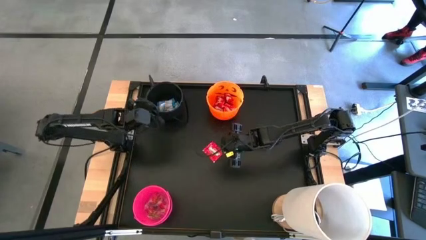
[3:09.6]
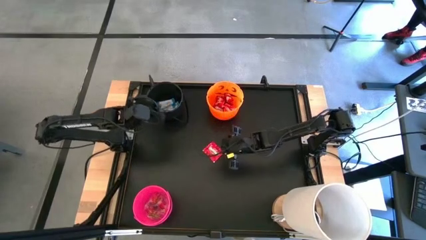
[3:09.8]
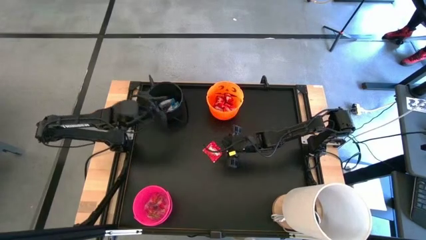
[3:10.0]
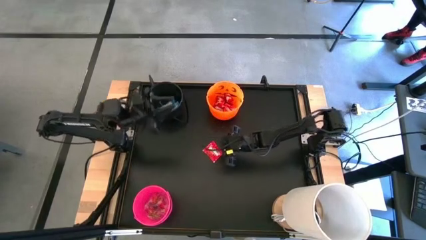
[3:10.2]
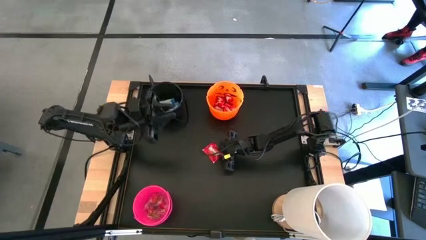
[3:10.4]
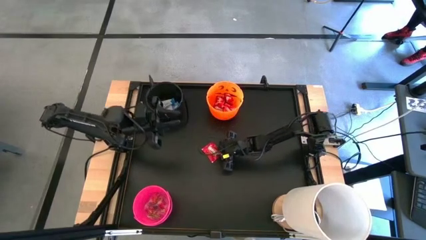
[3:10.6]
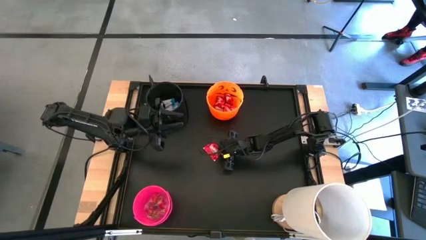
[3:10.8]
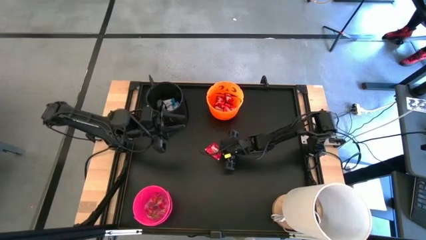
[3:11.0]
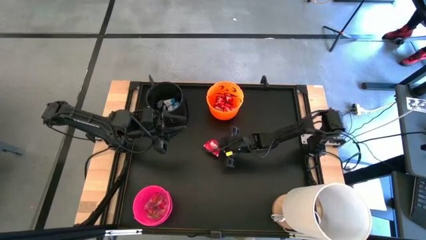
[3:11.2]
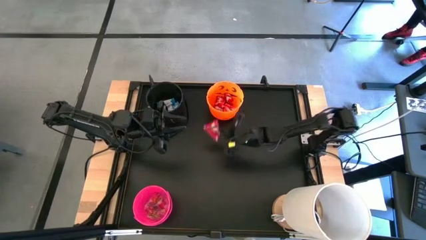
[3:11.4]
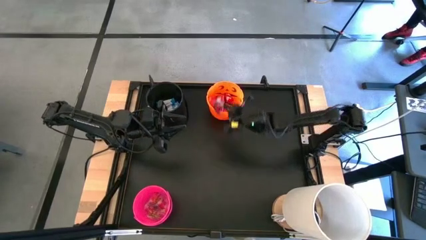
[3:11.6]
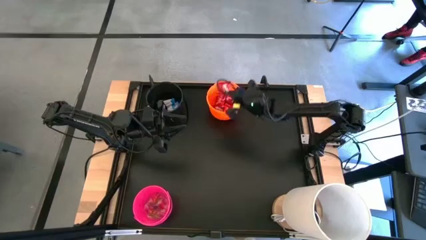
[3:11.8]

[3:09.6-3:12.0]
Task: Sort candy
Put the red candy into the pink bin

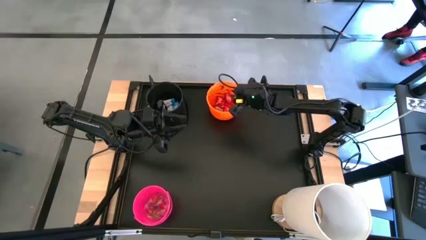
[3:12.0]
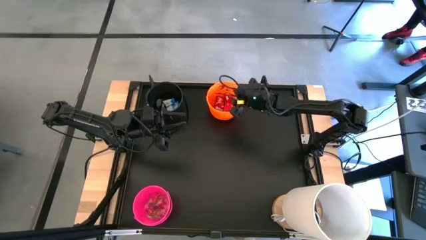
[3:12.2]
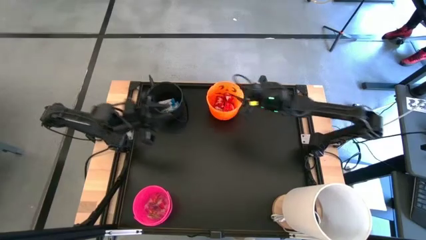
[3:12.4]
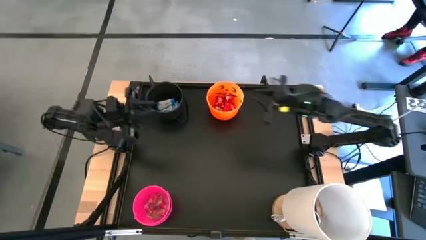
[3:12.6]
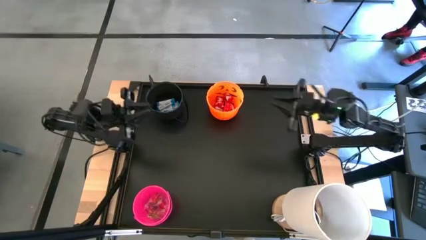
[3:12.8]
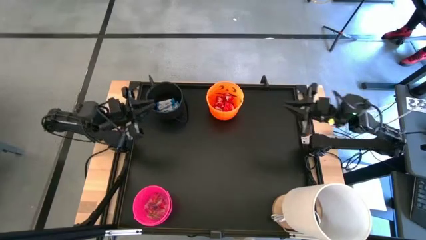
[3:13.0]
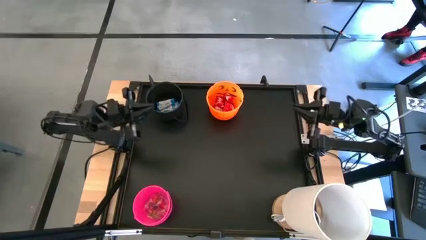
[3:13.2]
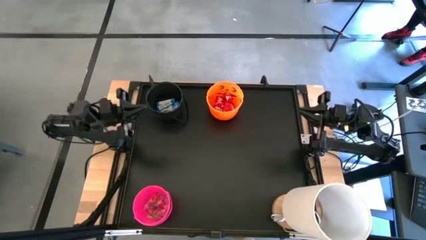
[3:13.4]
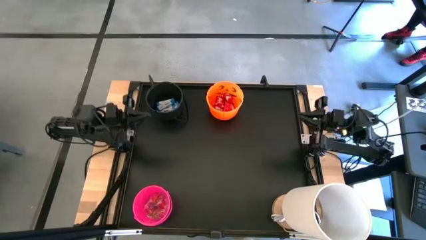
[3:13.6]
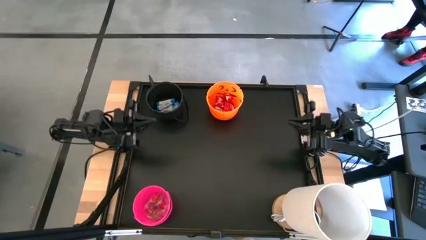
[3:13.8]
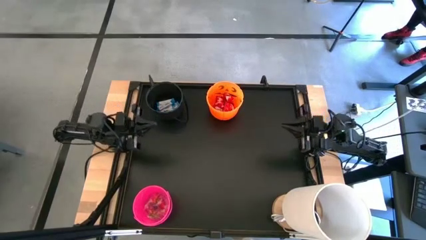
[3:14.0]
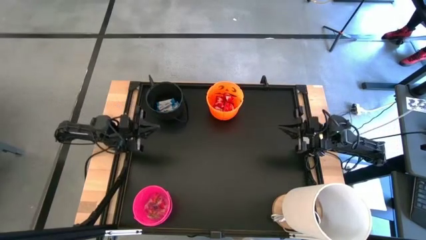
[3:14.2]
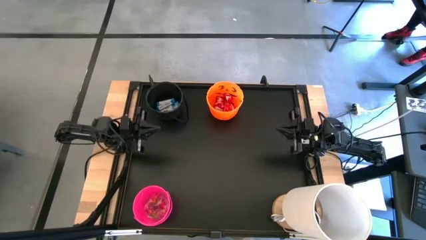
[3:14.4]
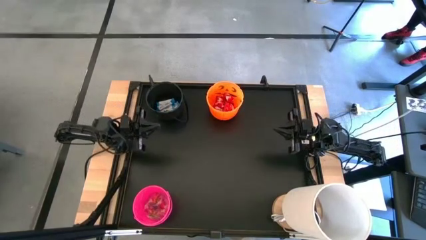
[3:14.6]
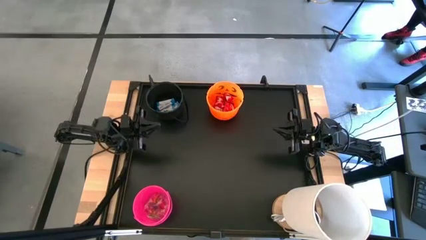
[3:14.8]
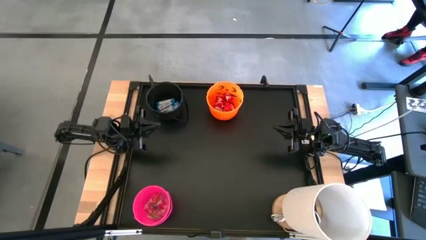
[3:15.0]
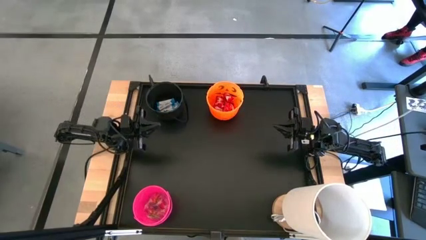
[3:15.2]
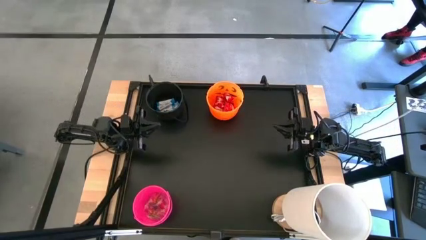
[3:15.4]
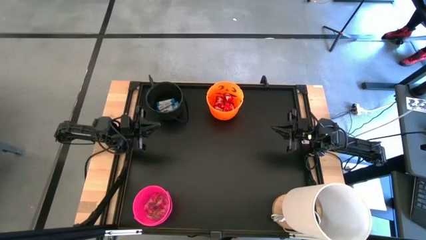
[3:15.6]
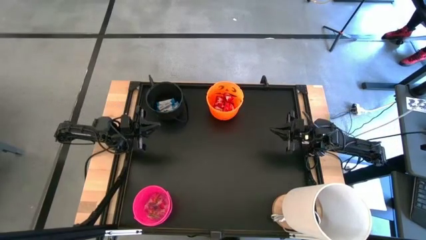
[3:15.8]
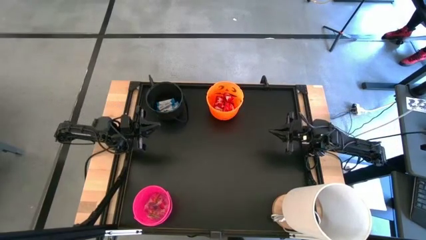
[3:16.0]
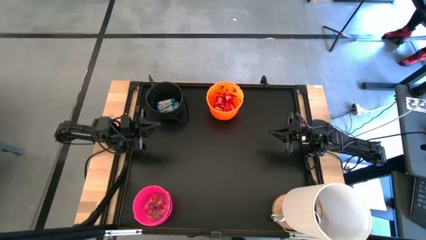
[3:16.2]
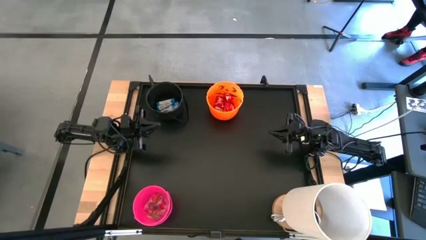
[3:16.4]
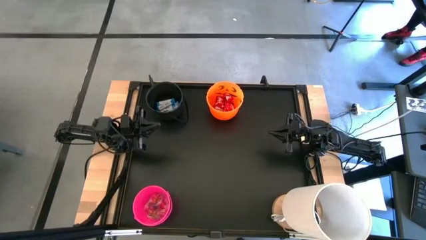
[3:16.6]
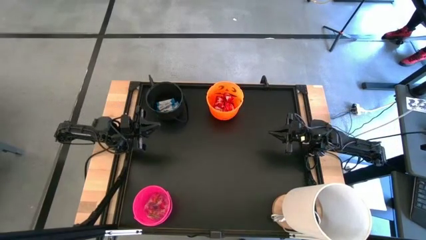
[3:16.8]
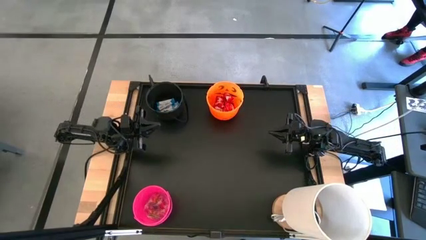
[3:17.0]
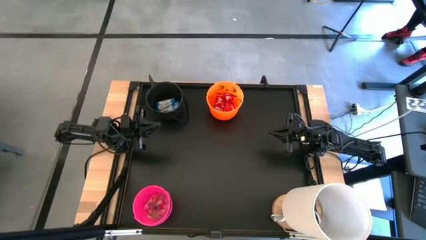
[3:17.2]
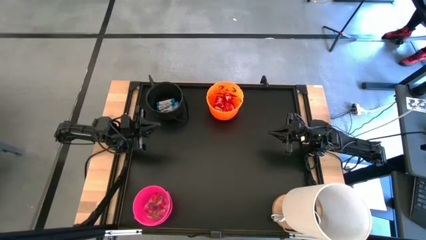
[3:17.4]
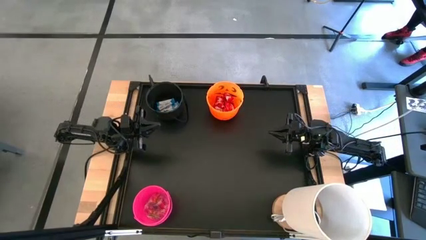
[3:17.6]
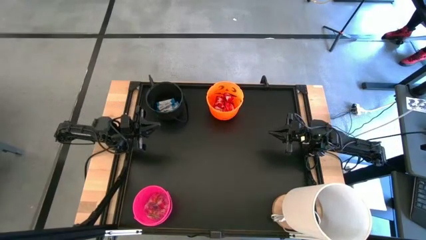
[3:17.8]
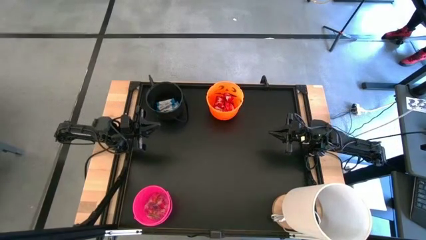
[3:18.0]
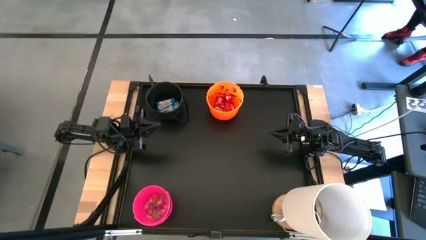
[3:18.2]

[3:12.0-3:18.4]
Return to Home Position

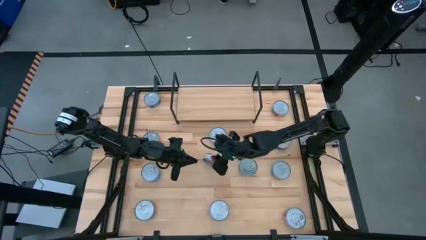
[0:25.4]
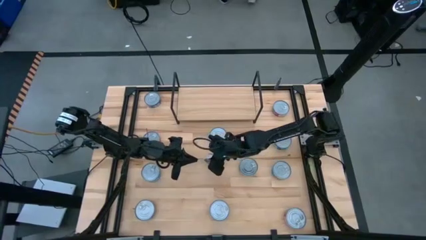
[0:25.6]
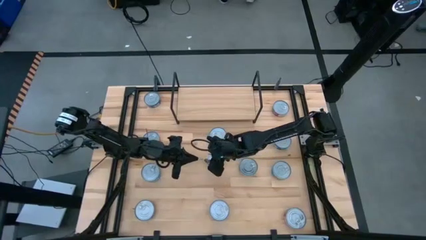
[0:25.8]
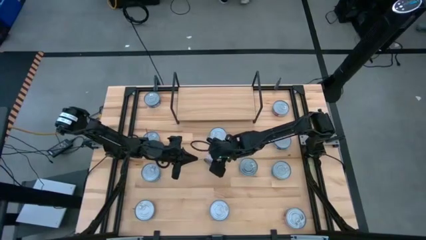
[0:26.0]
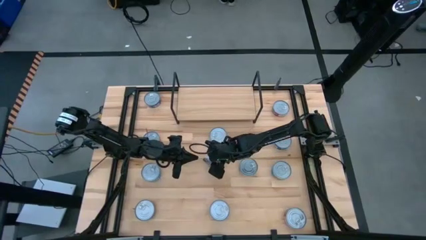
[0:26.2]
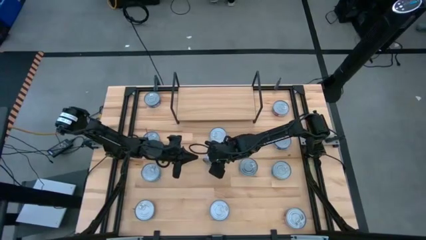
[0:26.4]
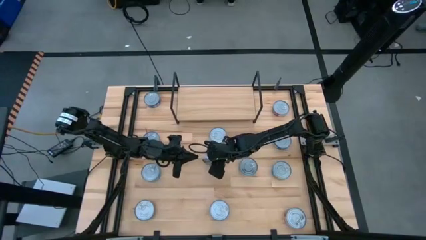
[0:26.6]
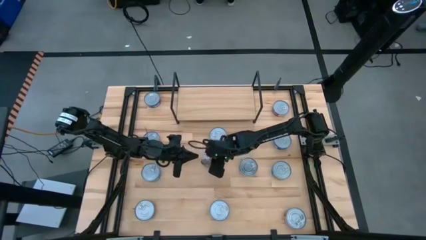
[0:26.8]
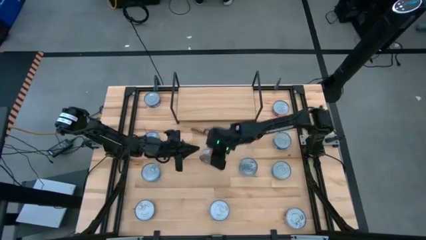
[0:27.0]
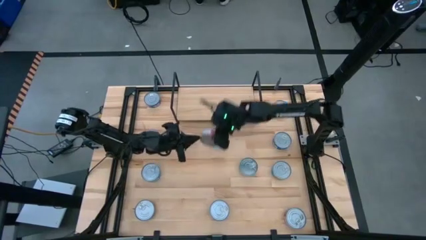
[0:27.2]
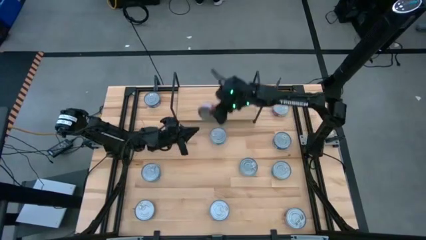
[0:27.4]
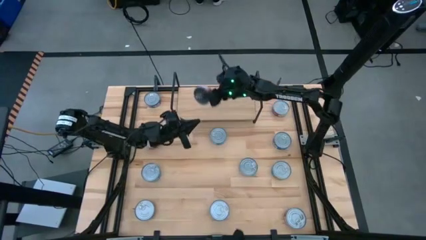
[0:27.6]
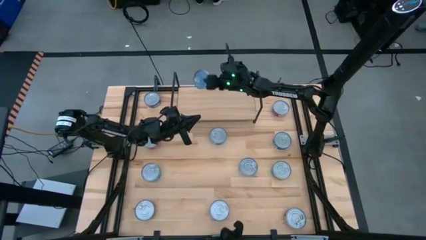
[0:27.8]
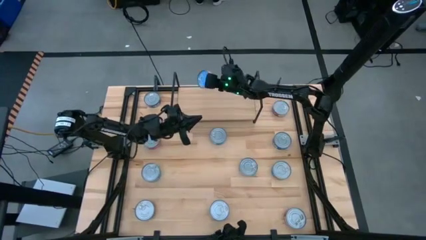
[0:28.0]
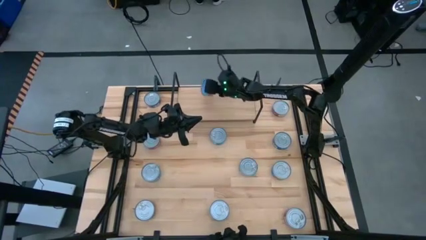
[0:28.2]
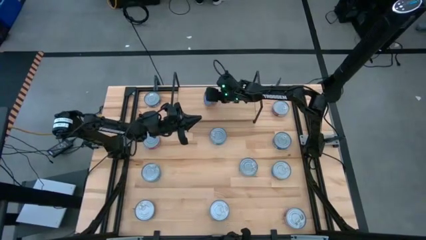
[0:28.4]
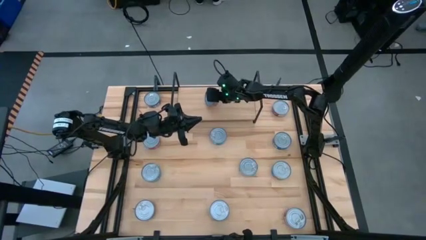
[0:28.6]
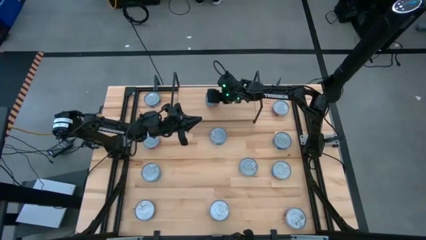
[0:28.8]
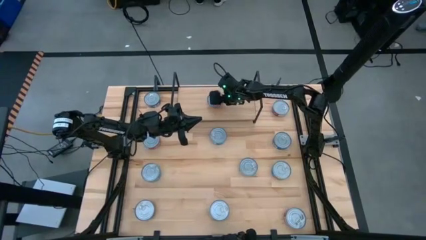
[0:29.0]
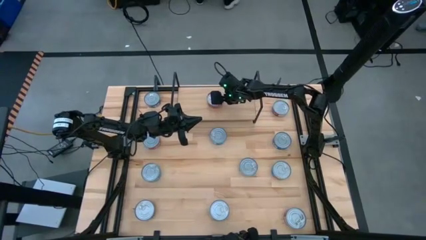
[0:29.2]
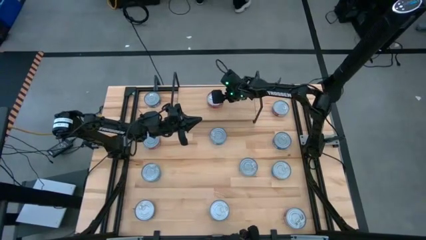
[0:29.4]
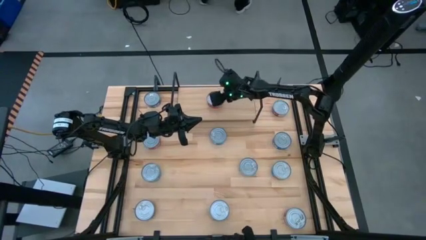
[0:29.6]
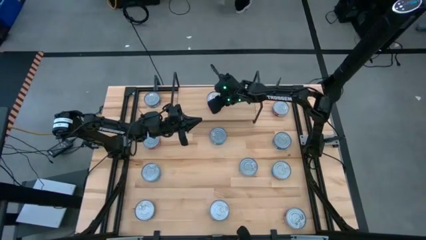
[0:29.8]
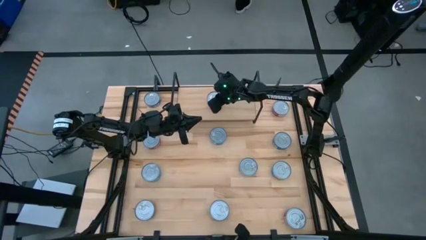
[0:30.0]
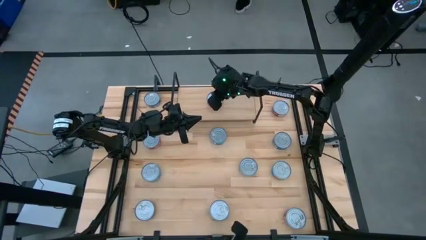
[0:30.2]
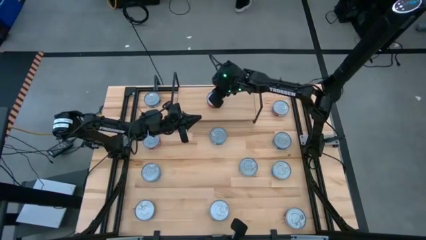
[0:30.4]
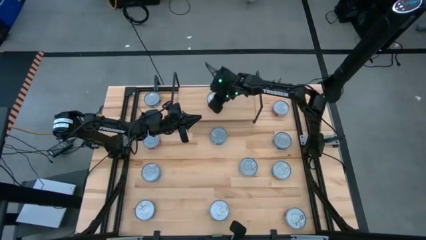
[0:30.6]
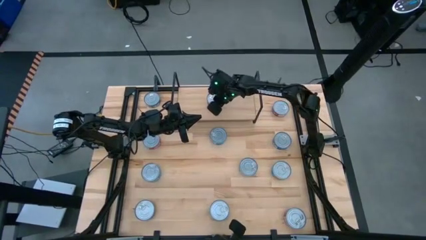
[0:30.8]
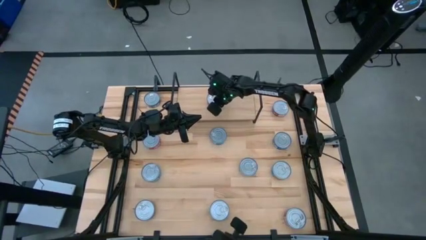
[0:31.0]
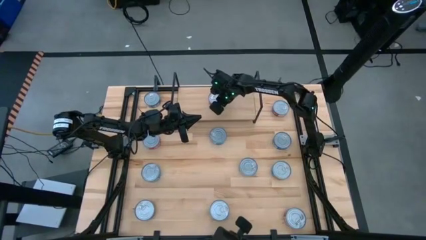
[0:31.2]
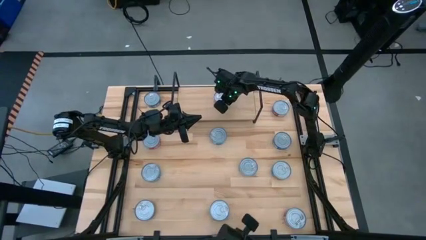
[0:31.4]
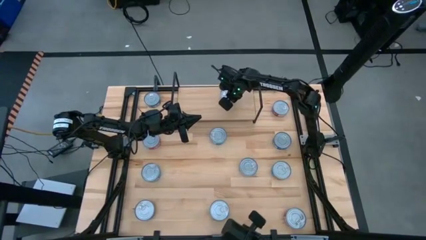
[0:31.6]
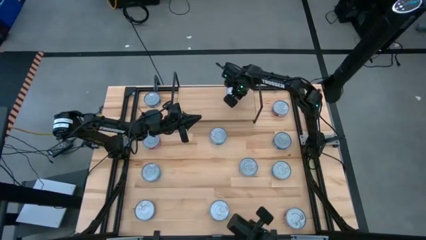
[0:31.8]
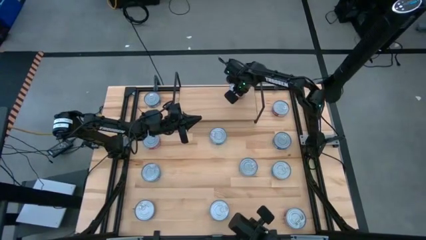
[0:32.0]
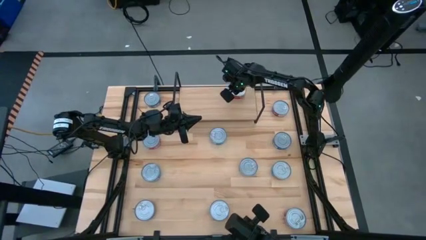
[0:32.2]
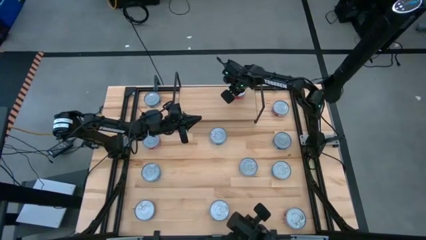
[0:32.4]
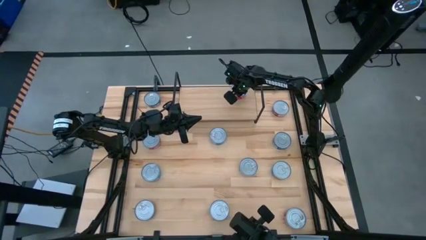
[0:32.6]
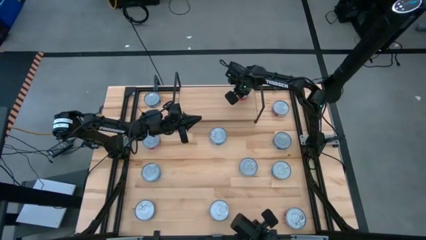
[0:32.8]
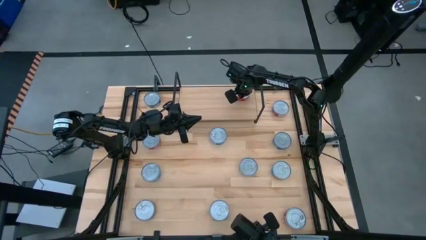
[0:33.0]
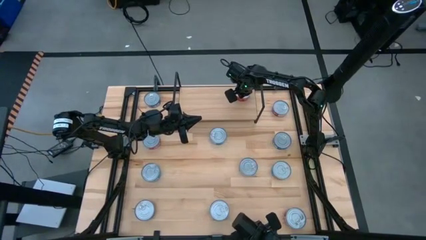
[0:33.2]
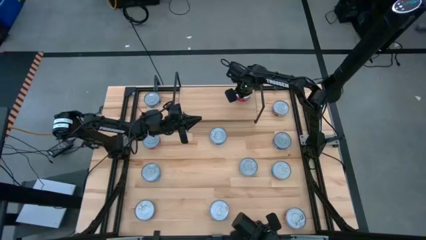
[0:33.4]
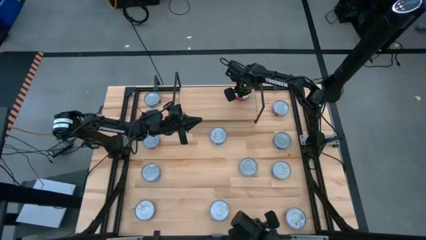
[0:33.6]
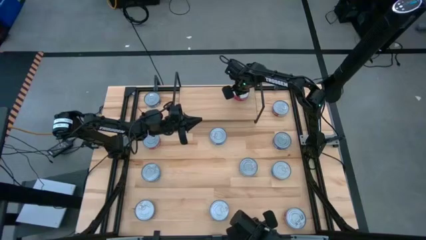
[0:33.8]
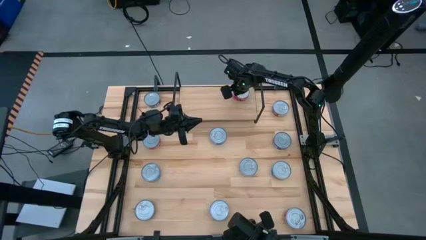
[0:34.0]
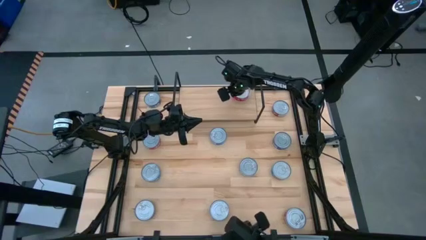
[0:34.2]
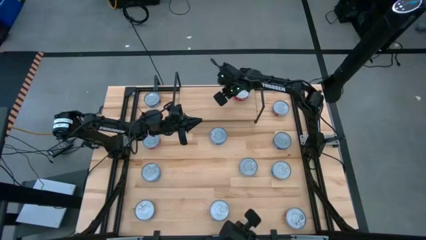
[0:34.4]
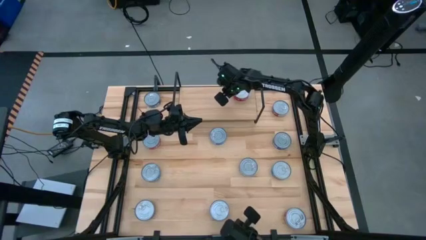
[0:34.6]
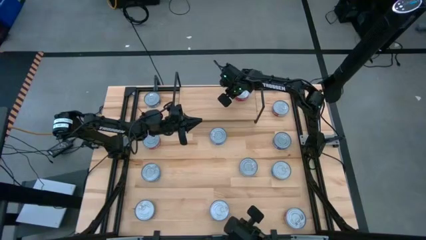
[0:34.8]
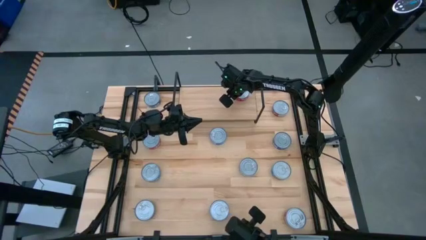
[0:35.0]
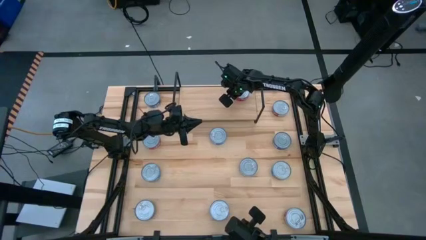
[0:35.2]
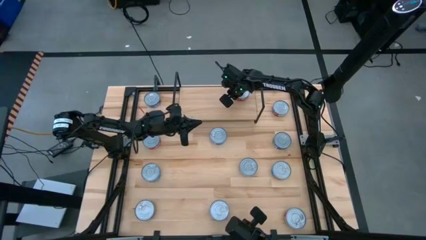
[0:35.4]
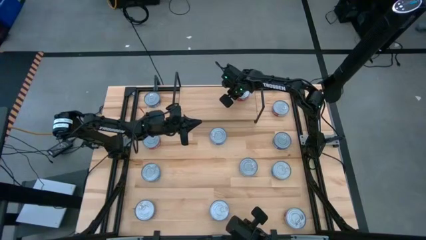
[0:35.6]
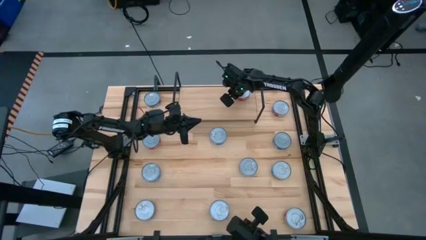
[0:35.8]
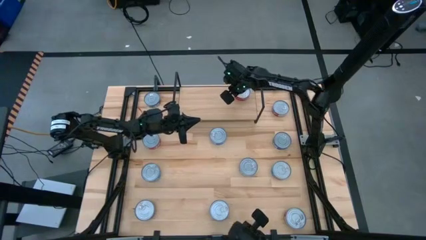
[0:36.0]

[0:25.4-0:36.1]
Task: Stack canned seafood by type on shelf
Put the center red tuna can on the shelf
